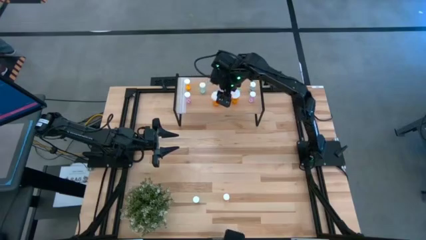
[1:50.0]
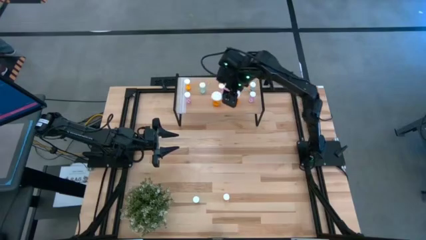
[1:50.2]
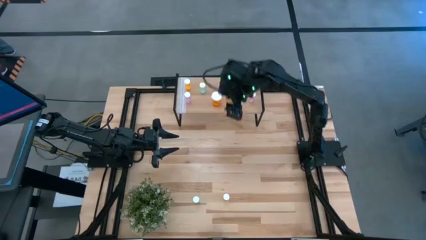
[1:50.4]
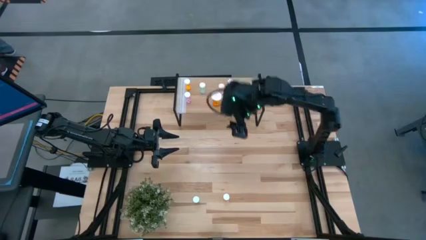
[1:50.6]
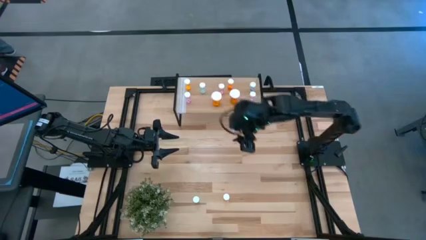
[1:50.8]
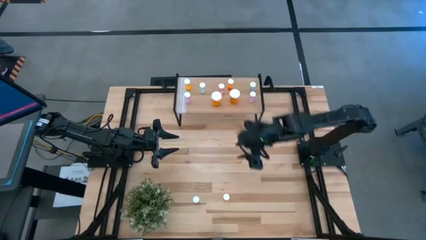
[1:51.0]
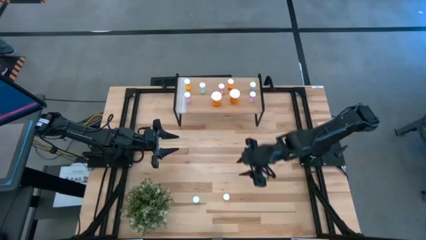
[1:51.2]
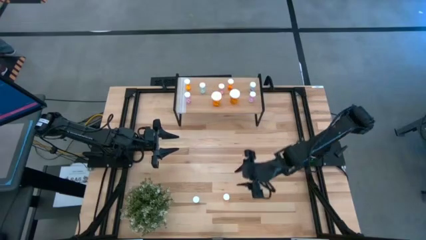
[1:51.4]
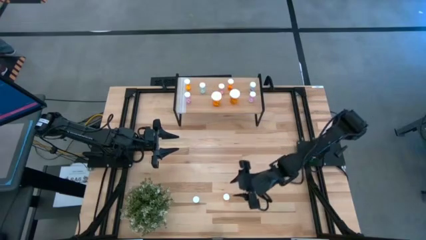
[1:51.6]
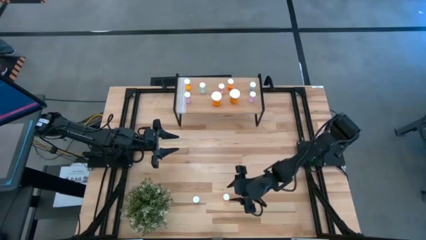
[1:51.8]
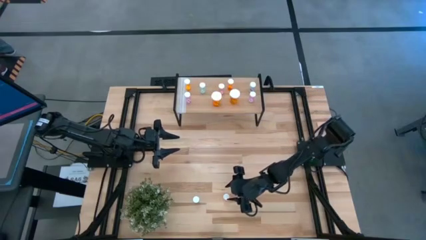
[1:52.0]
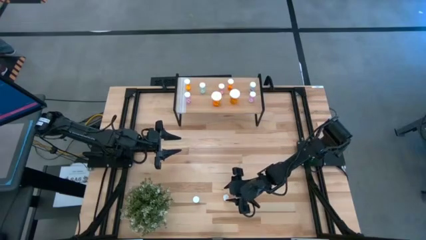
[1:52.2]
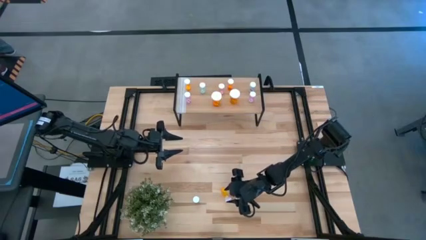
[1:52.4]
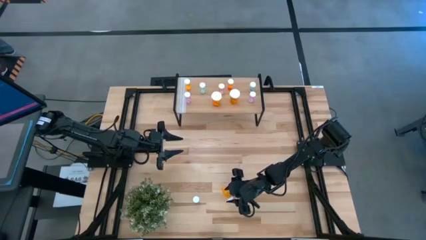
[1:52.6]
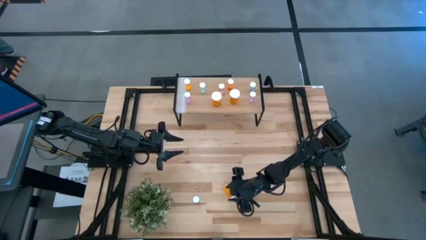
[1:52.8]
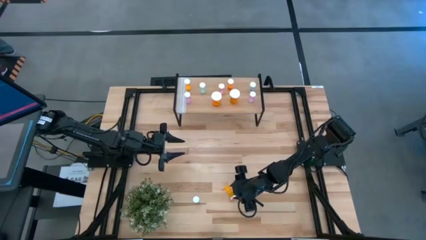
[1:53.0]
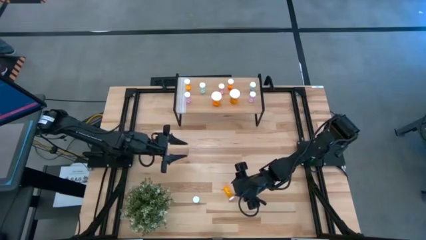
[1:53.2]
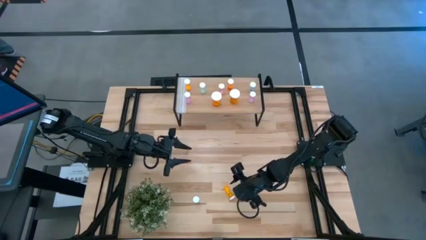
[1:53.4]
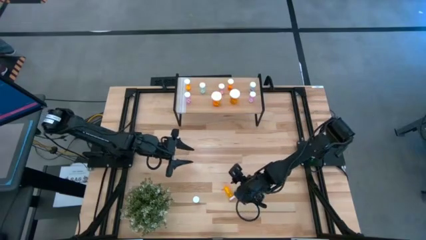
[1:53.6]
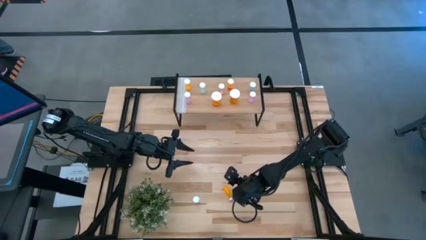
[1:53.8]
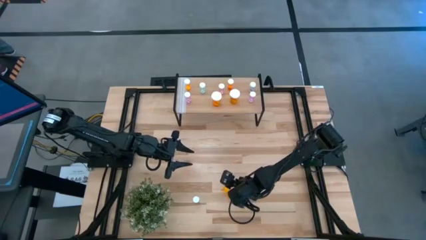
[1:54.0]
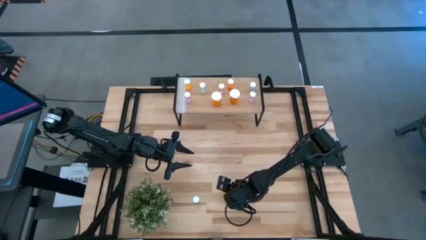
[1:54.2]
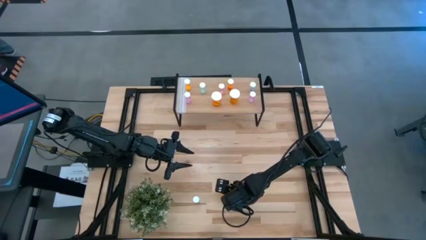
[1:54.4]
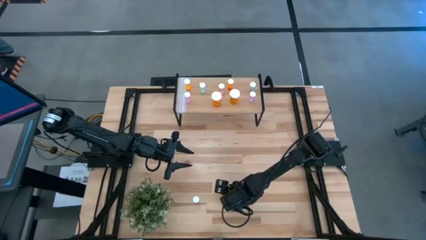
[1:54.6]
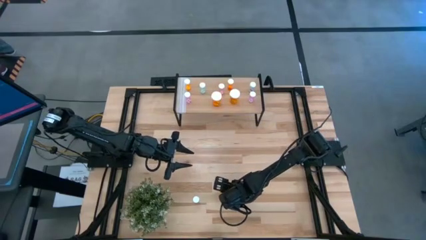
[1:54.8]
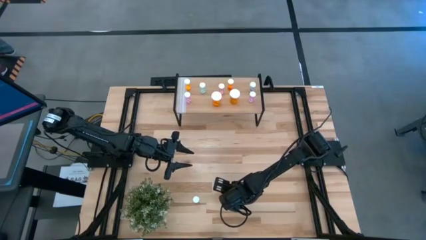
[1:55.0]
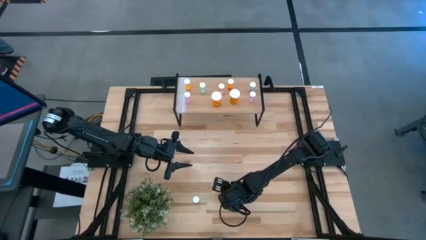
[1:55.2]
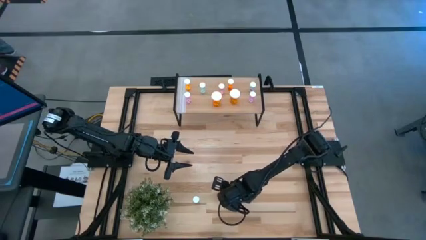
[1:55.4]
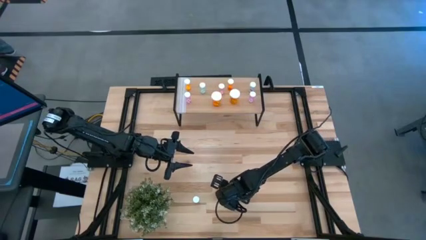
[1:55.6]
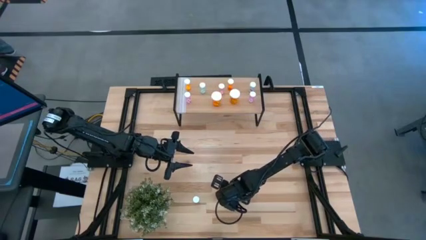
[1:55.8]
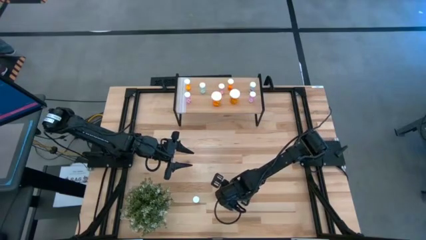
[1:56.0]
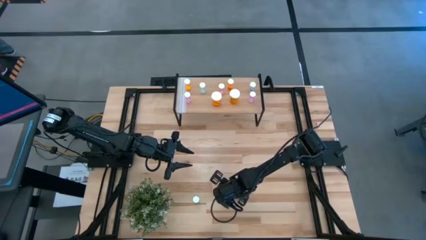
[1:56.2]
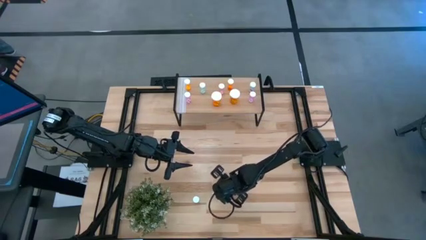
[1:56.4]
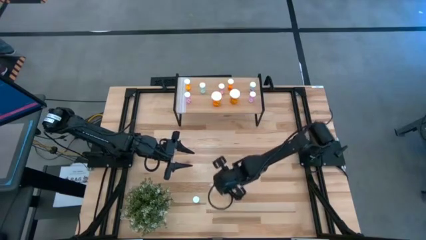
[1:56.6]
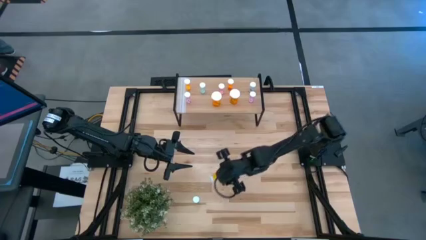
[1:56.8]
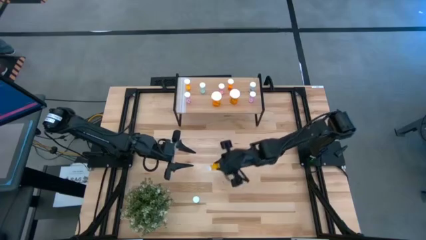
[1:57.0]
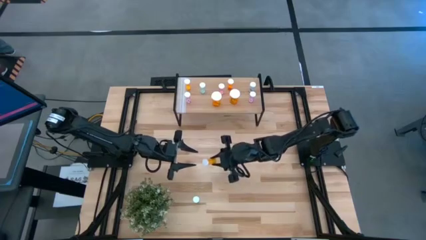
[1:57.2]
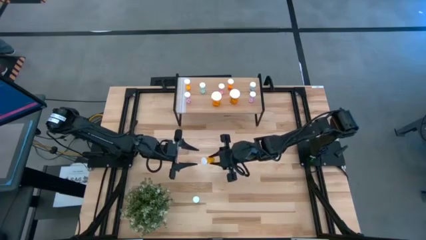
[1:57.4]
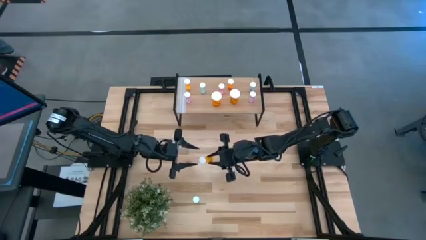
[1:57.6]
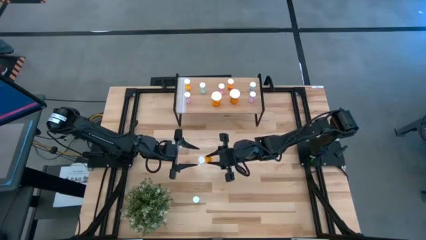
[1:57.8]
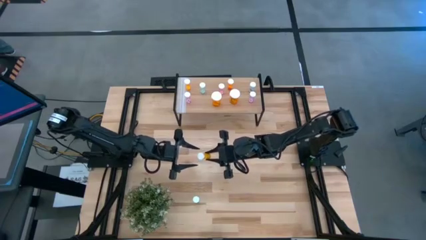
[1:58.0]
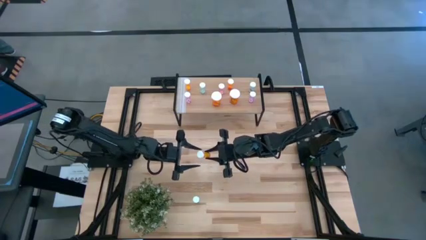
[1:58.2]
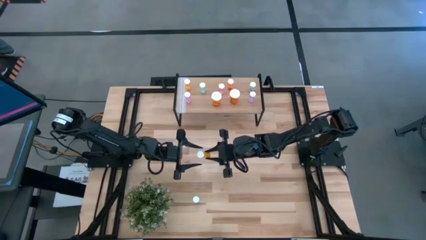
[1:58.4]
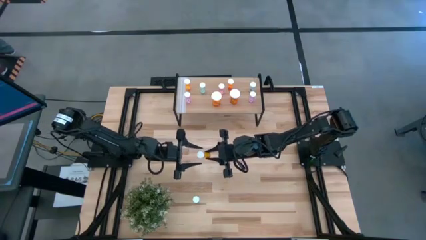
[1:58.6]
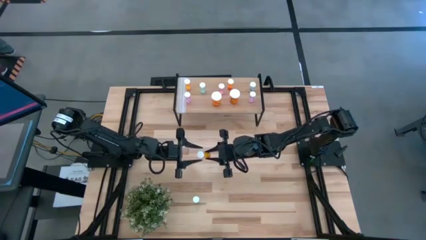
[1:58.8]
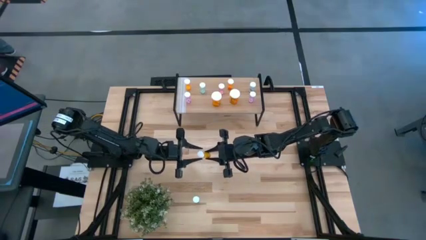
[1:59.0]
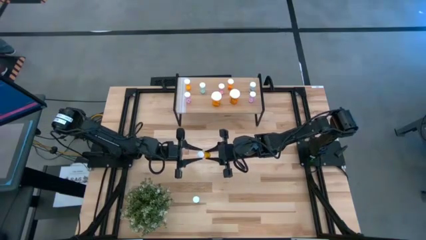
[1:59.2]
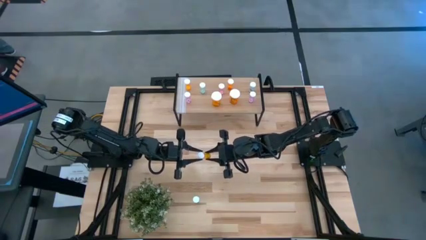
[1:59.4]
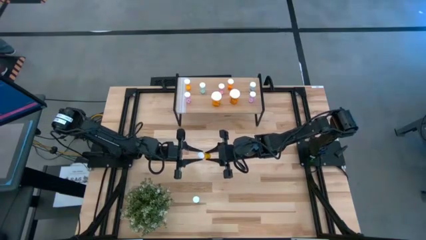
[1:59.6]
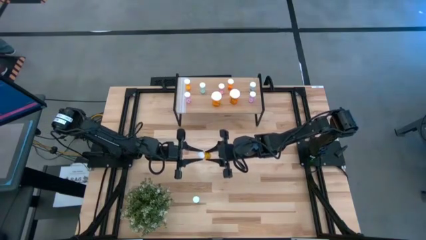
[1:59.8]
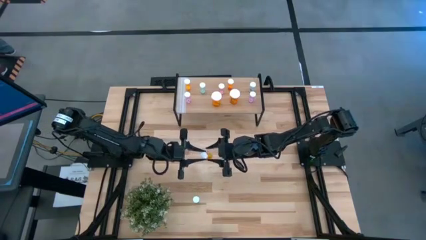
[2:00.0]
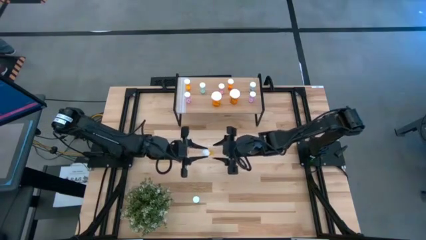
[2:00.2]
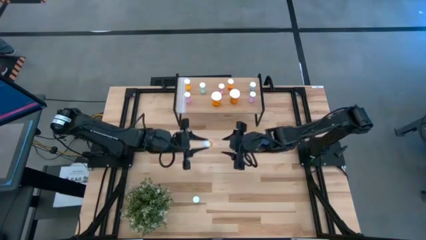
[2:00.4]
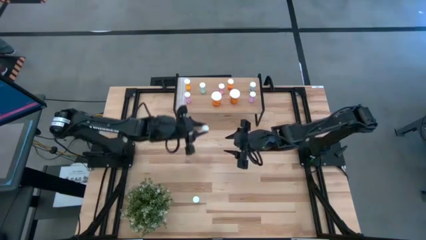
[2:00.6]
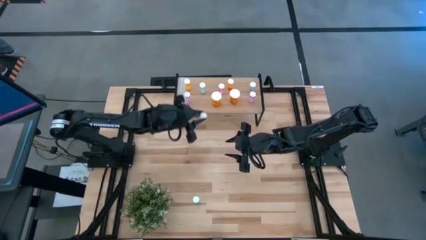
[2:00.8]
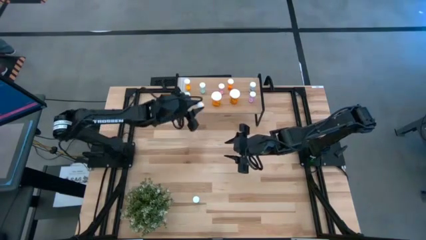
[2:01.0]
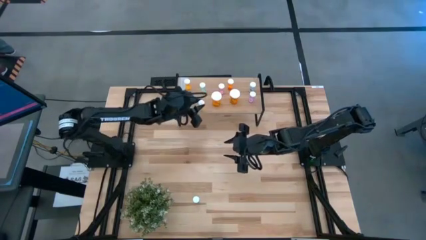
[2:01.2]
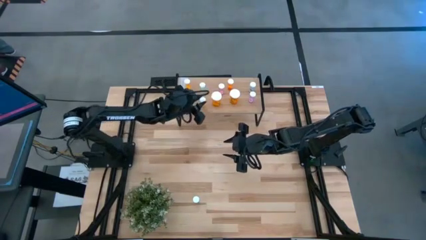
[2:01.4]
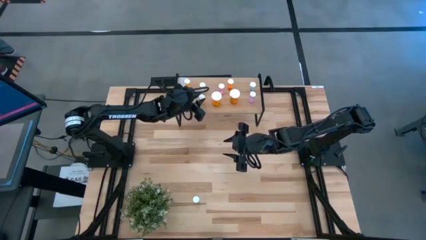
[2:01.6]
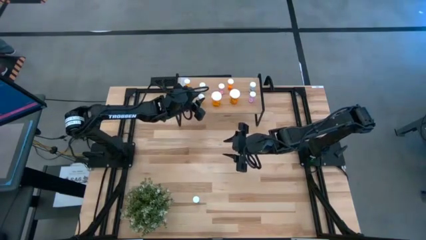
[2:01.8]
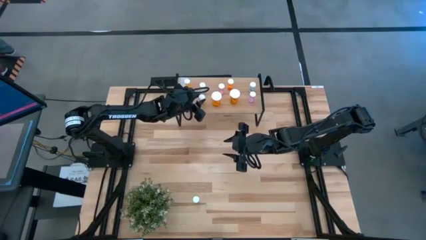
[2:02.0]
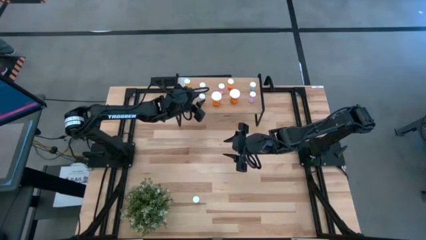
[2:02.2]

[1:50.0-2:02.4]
Task: Pick and place medicine bottles onto shelf by color
Put the light orange pill bottle on the shelf
